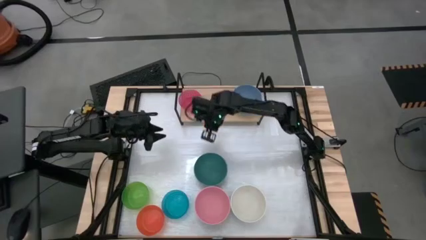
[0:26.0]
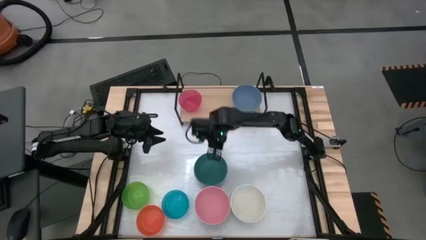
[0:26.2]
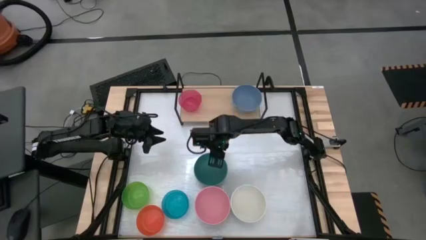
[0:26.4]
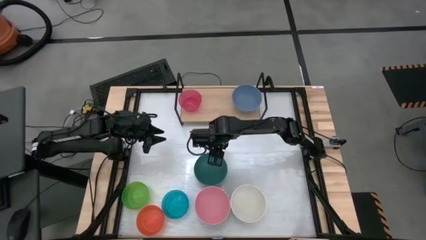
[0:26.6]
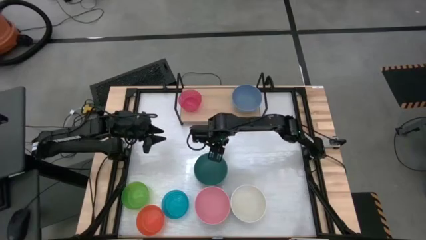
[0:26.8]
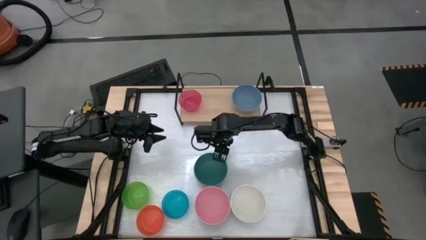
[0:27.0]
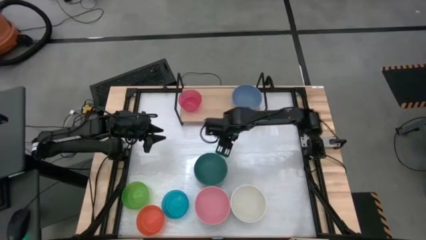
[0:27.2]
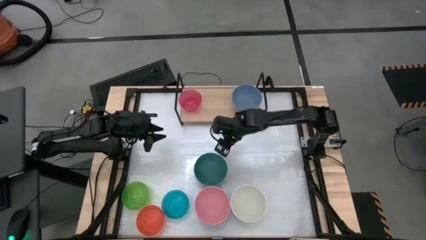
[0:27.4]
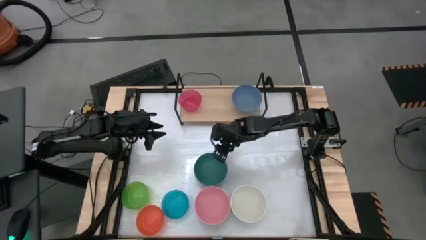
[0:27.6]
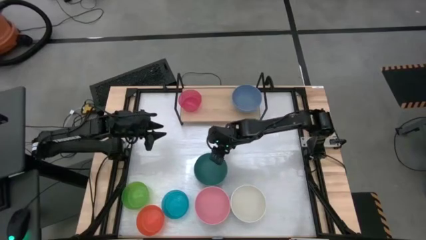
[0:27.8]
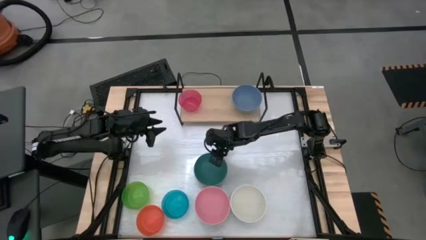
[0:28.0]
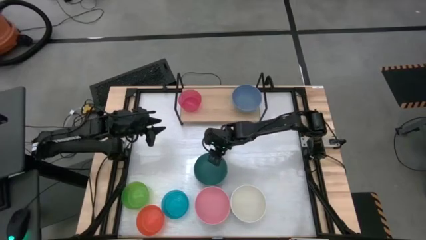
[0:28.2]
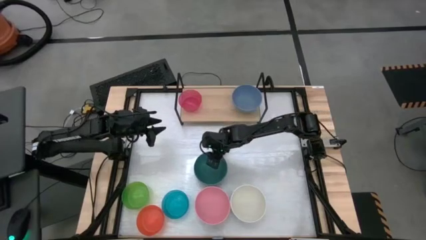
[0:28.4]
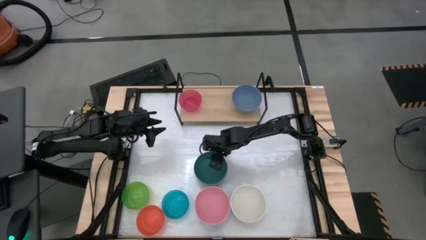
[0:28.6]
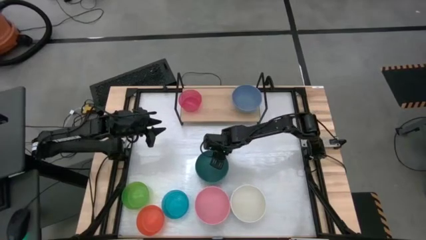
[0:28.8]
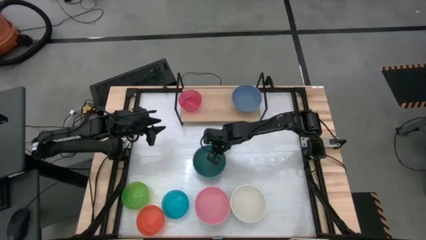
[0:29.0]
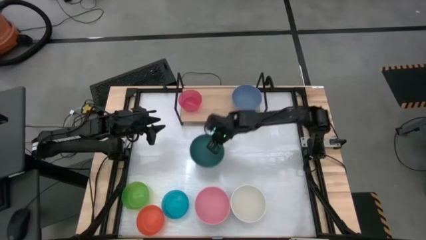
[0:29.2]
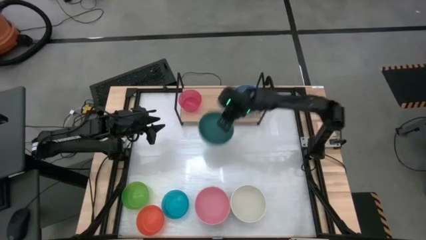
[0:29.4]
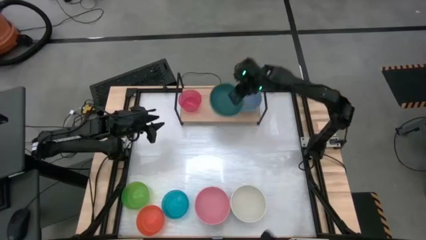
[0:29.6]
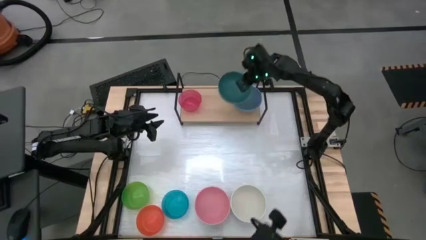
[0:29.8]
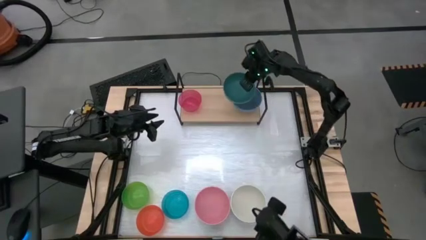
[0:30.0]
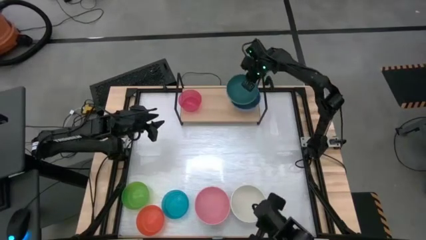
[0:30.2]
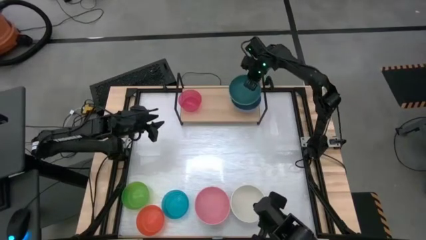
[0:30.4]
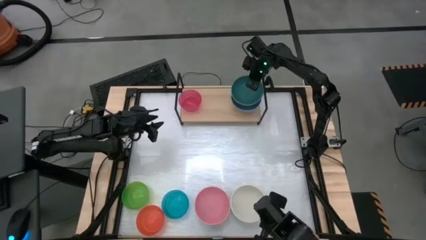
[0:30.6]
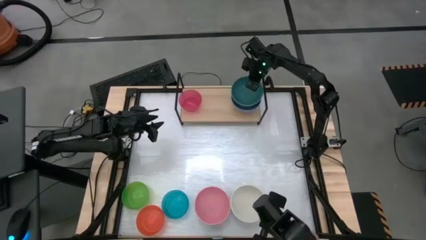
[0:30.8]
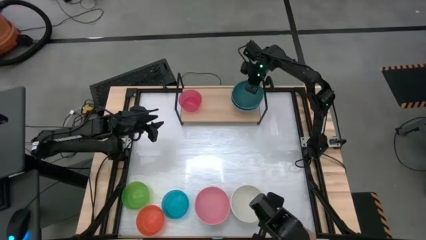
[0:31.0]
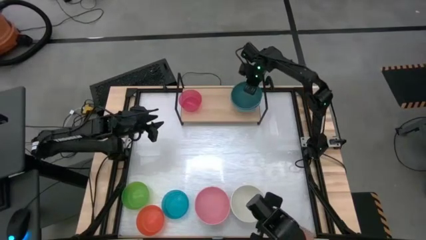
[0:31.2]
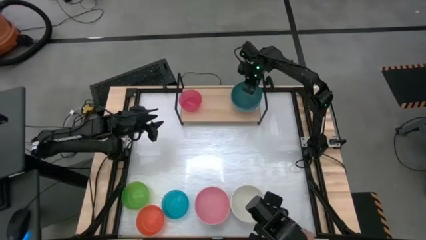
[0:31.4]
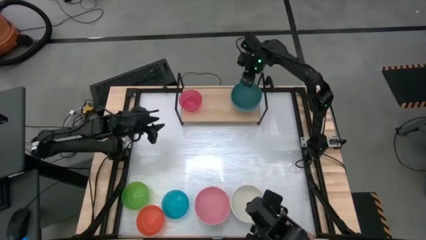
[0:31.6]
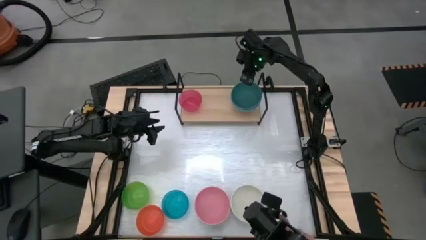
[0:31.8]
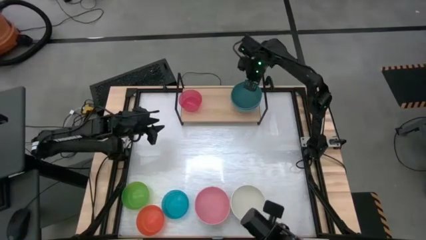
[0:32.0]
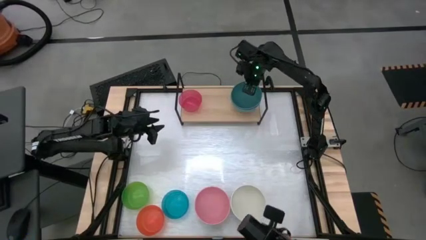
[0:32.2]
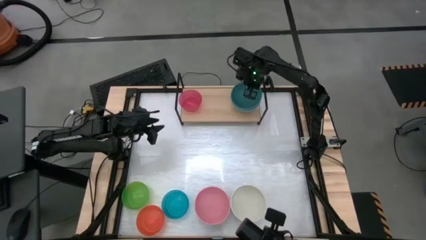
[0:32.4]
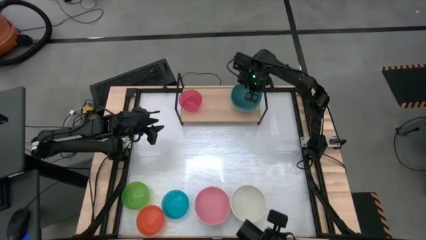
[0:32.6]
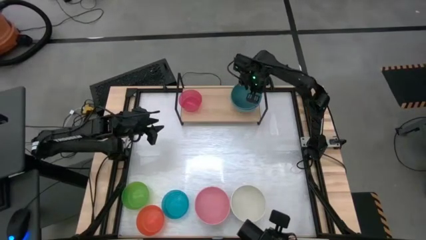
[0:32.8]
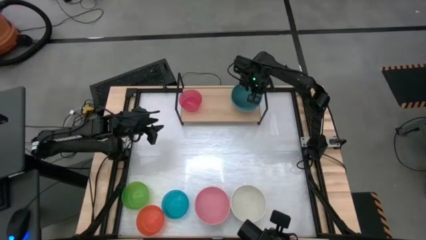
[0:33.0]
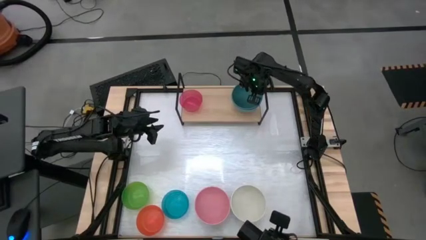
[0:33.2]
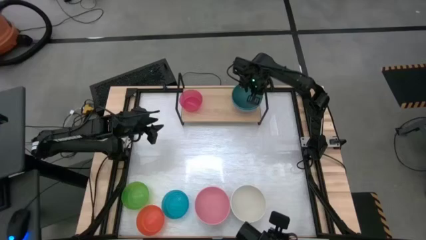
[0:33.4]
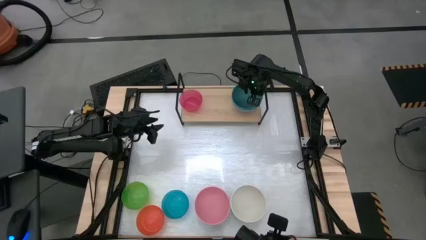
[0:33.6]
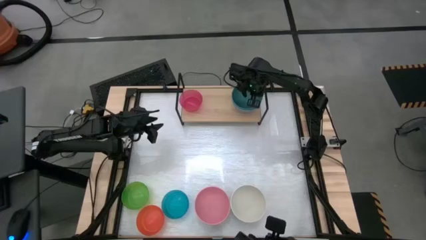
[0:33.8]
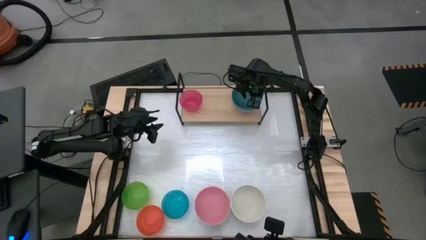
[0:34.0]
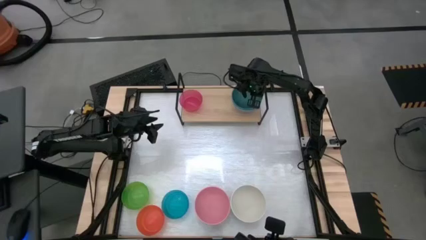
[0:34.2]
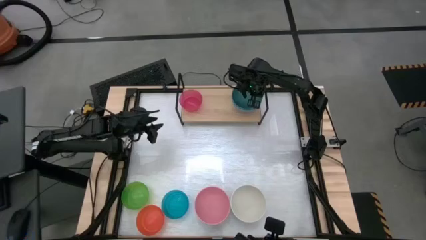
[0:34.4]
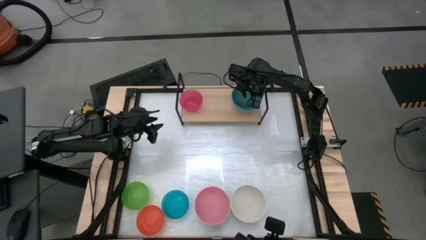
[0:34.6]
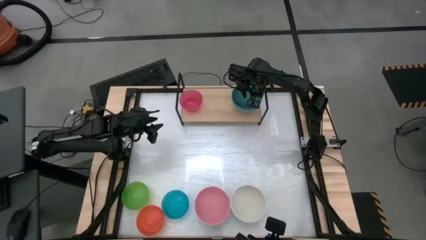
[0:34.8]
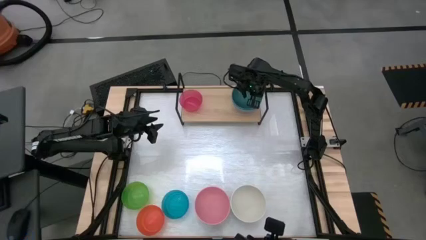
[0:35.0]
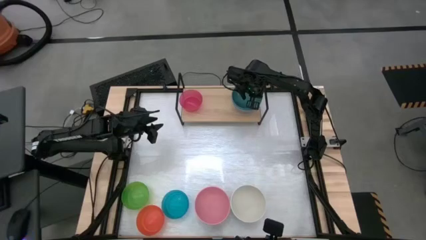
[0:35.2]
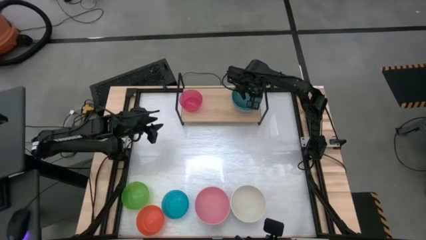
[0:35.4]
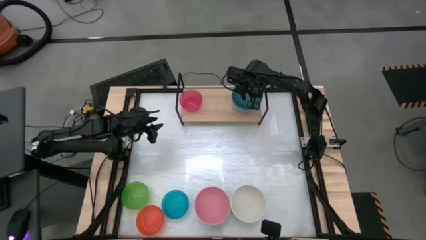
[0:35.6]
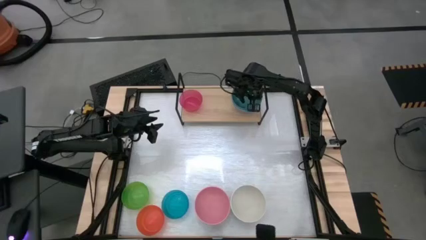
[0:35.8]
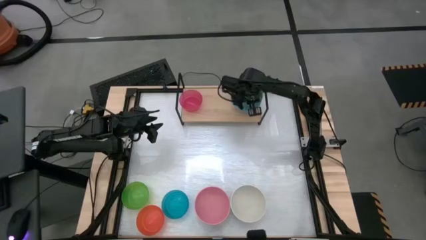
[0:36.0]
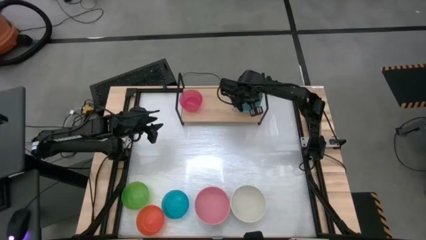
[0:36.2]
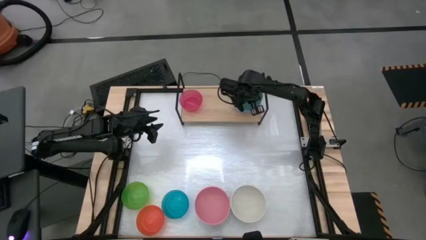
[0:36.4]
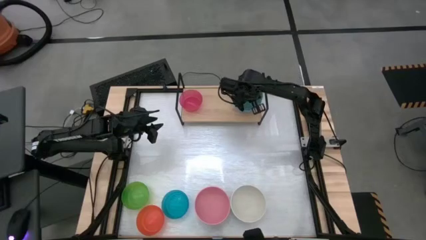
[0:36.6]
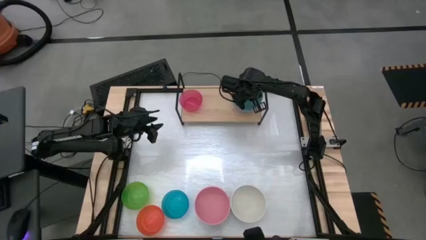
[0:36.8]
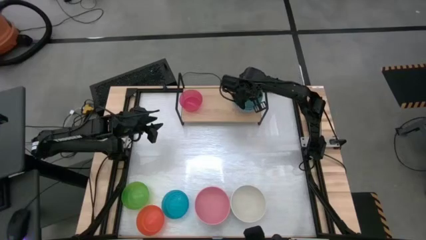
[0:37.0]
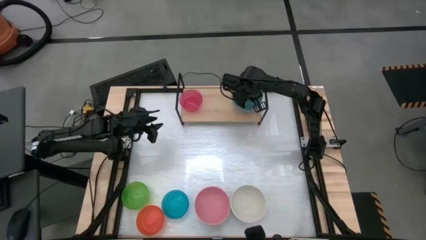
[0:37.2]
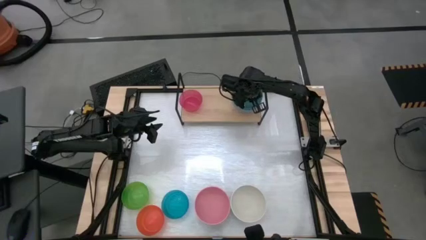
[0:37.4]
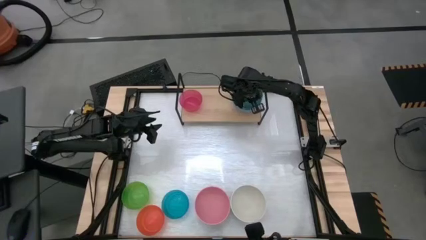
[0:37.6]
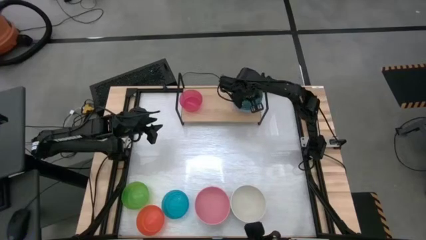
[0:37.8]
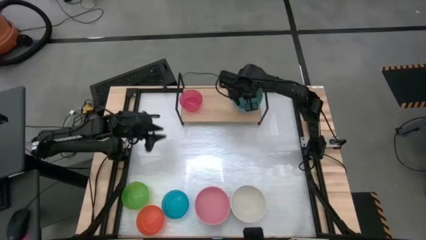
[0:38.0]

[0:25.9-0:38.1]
Task: Place and stack bowls onto a shelf
Stack the large green bowl on top of the large blue bowl on the shelf

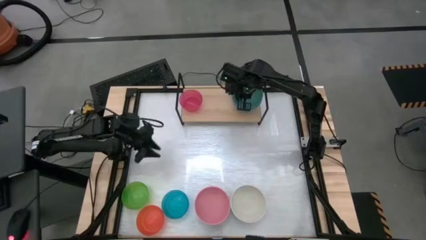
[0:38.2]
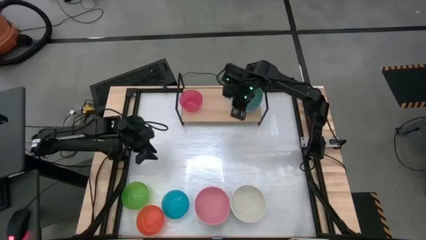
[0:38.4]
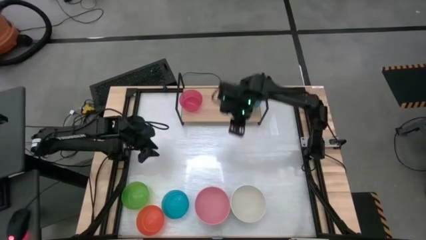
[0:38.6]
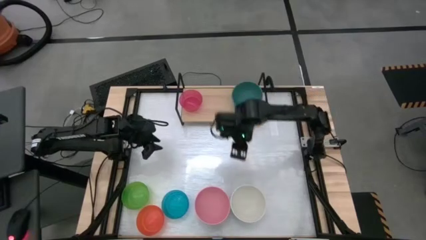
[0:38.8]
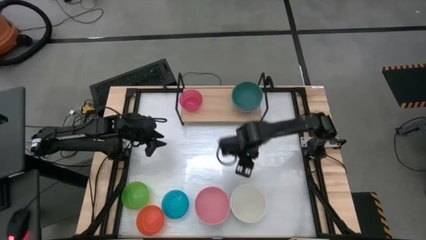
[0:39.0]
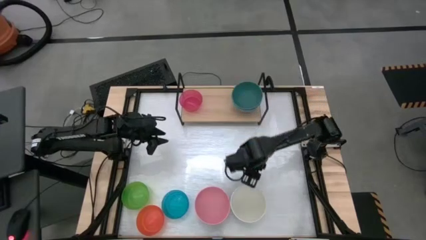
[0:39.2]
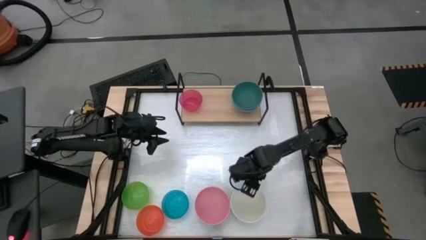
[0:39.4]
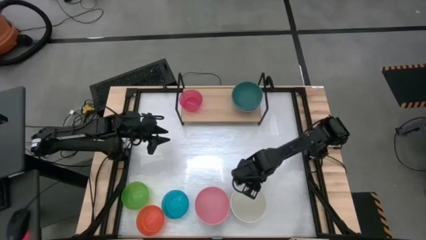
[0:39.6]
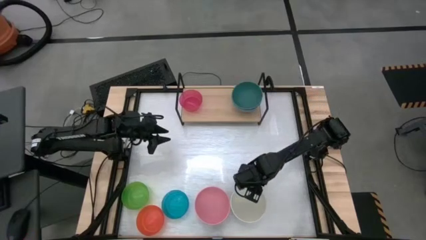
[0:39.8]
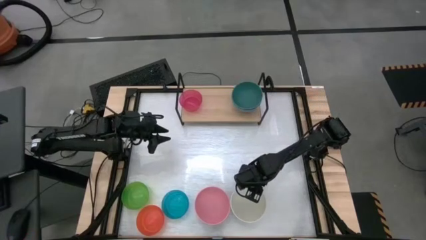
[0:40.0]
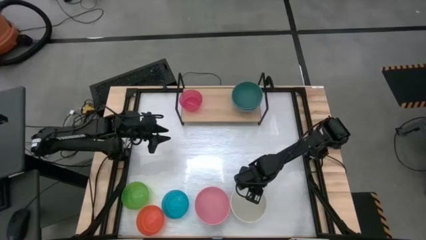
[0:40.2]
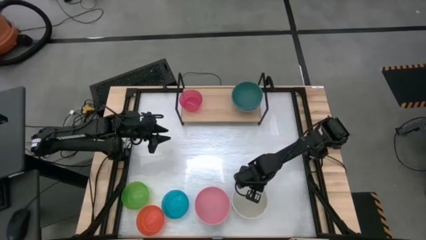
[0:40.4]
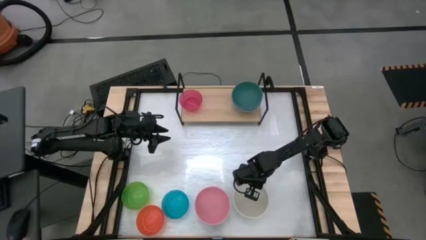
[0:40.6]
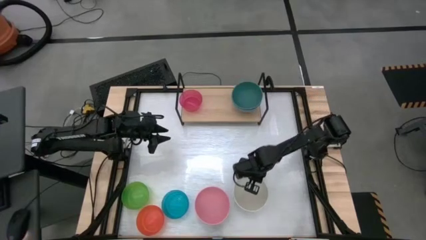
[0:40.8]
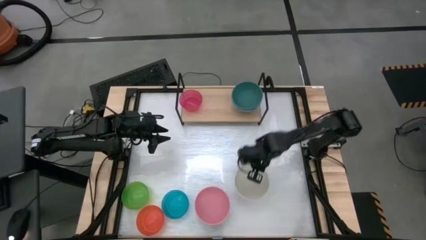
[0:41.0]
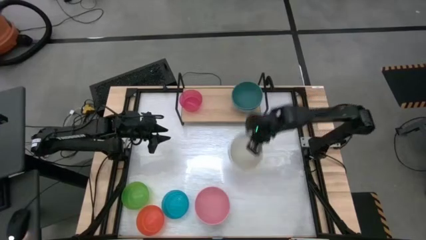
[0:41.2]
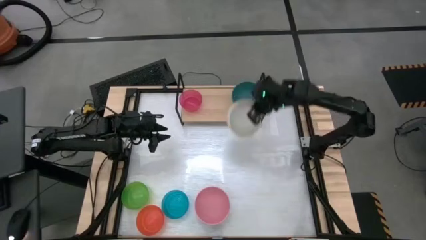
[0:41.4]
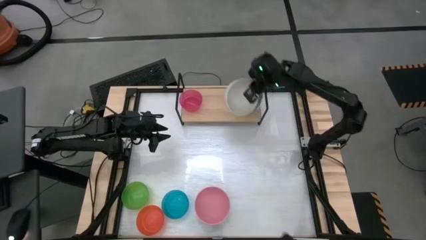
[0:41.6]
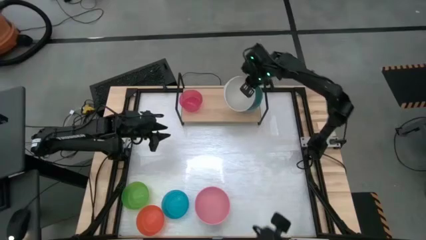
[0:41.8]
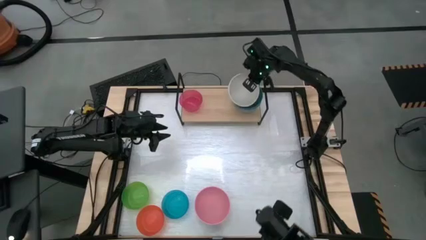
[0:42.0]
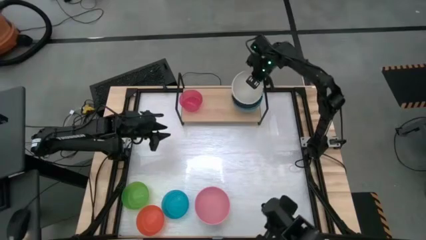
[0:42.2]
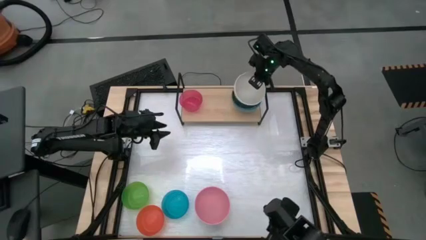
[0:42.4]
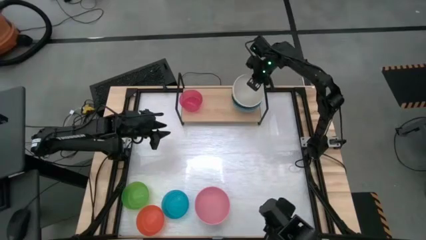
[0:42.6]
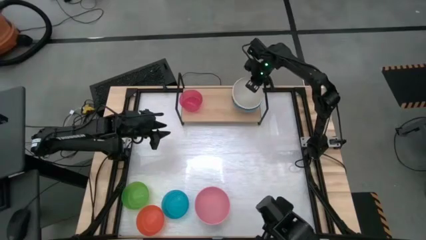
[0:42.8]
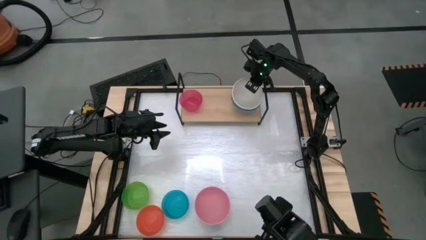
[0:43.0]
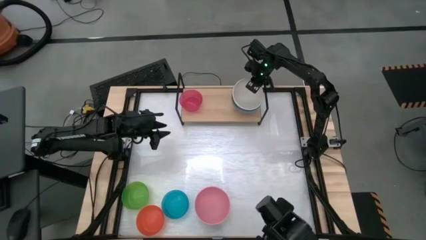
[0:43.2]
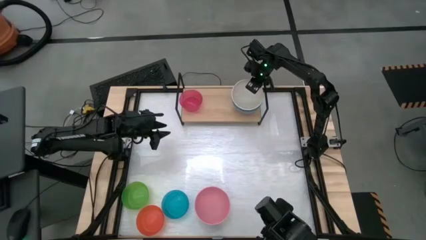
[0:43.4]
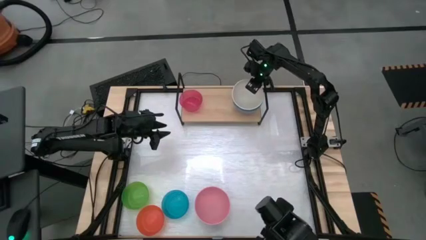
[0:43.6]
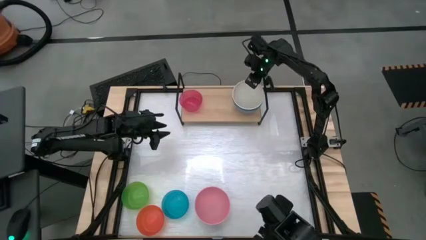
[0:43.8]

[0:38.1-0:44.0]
Stack the large white bowl on top of the large green bowl on the shelf
